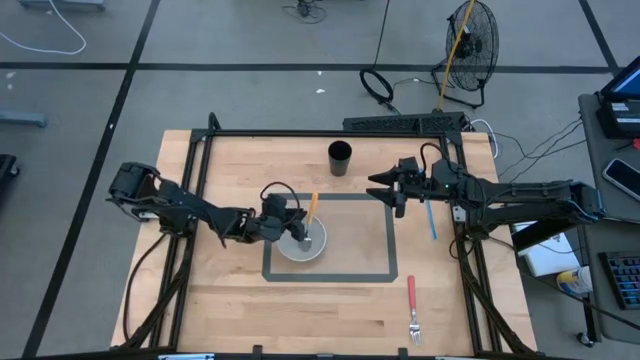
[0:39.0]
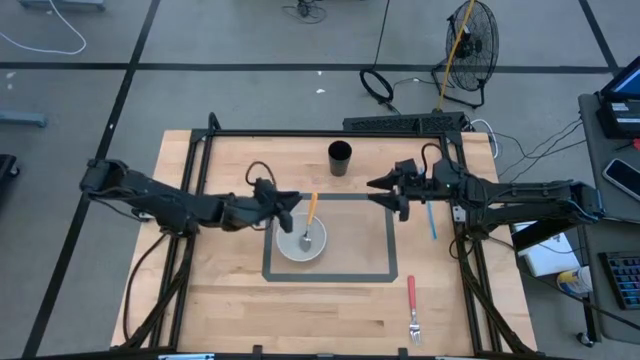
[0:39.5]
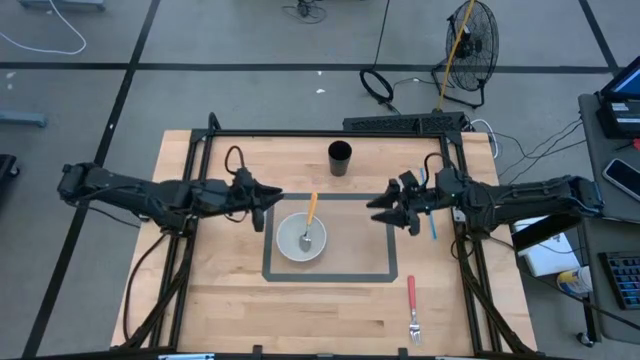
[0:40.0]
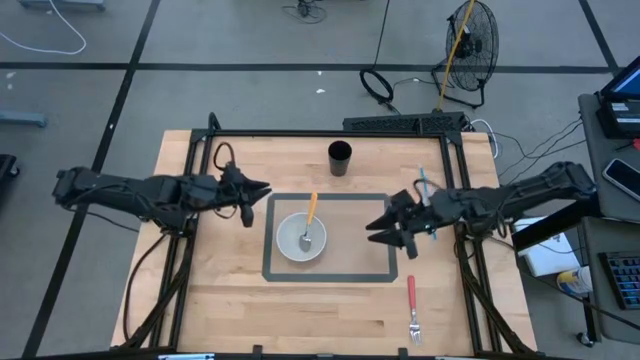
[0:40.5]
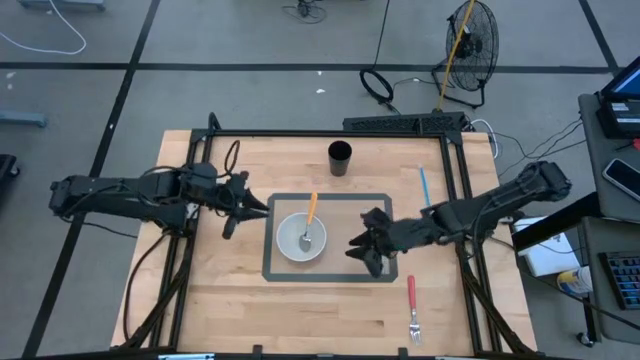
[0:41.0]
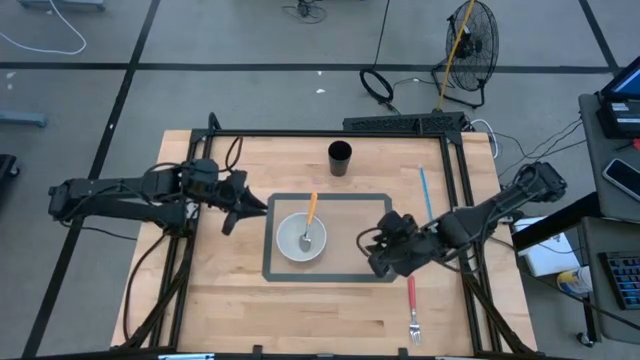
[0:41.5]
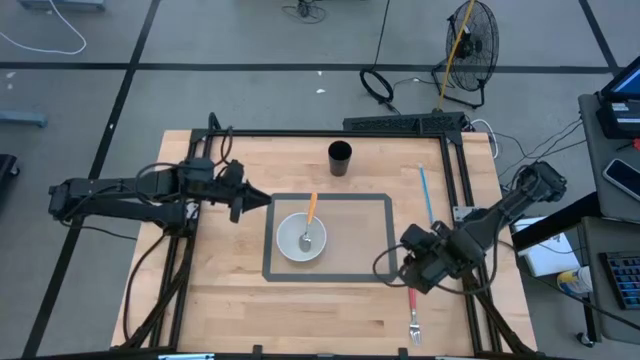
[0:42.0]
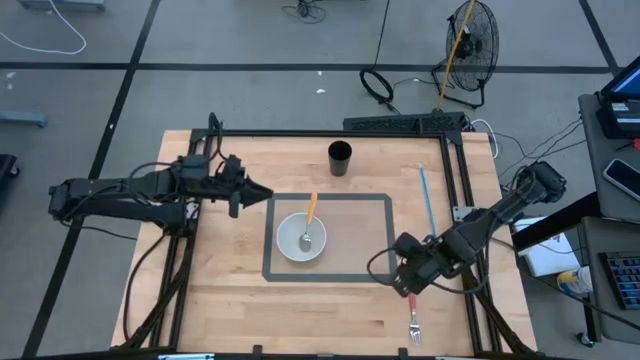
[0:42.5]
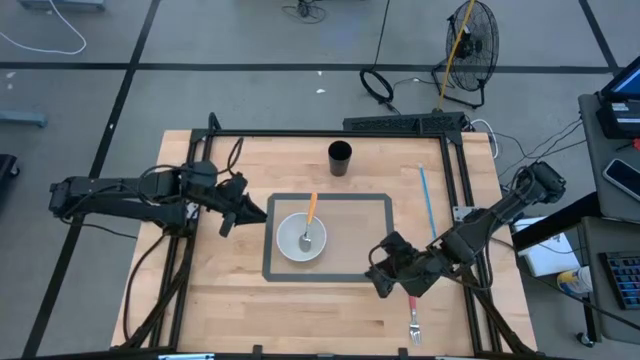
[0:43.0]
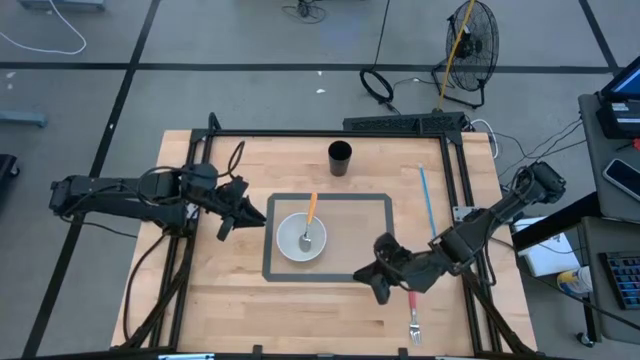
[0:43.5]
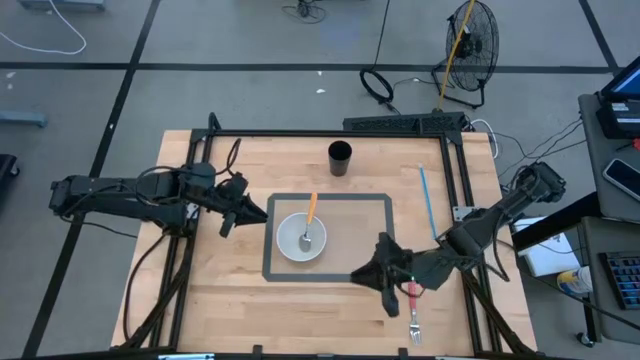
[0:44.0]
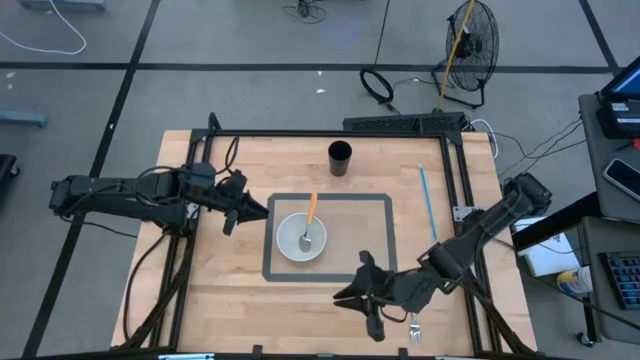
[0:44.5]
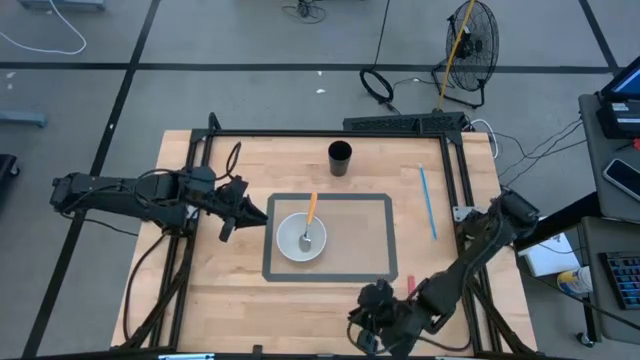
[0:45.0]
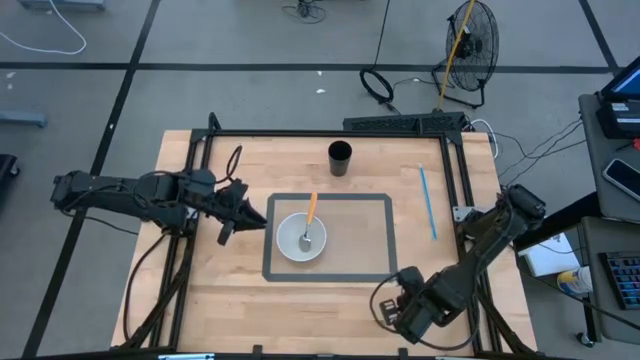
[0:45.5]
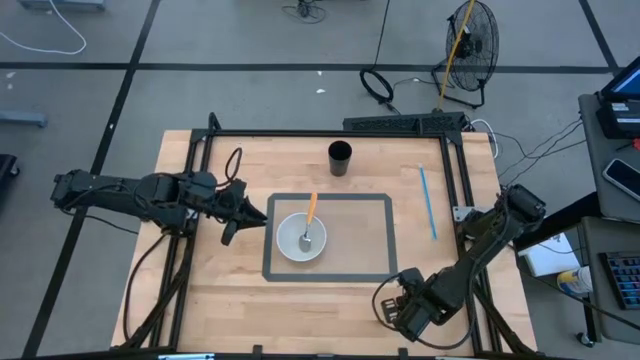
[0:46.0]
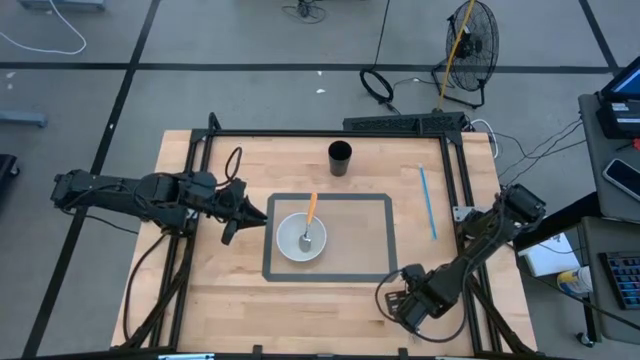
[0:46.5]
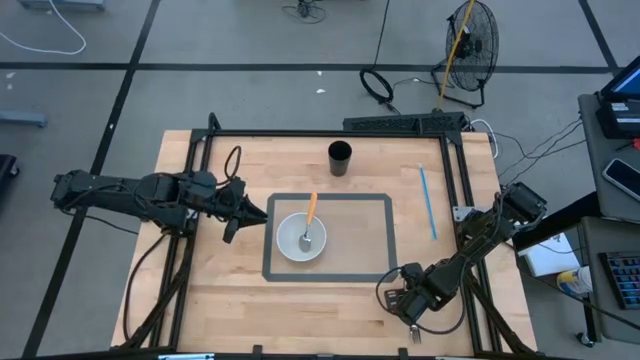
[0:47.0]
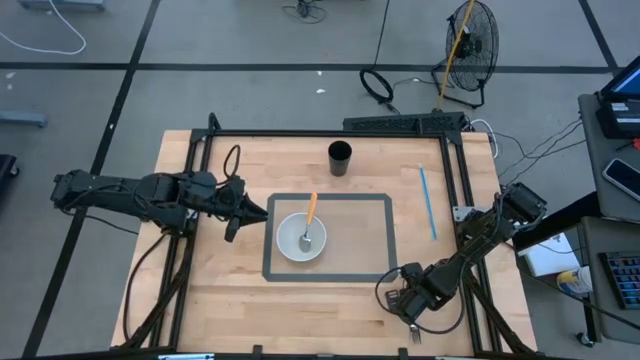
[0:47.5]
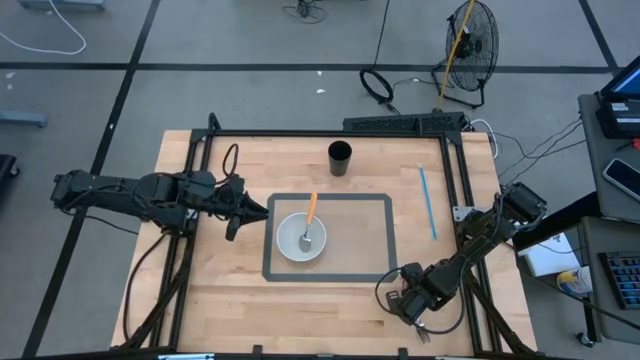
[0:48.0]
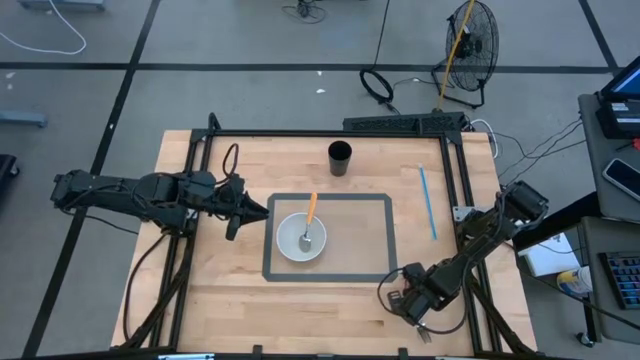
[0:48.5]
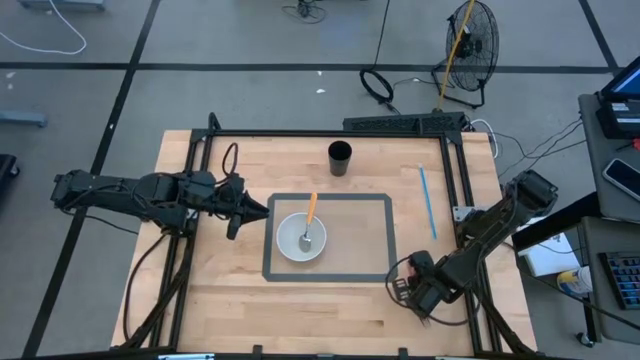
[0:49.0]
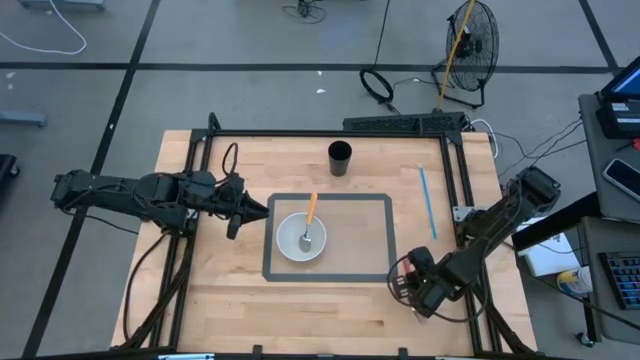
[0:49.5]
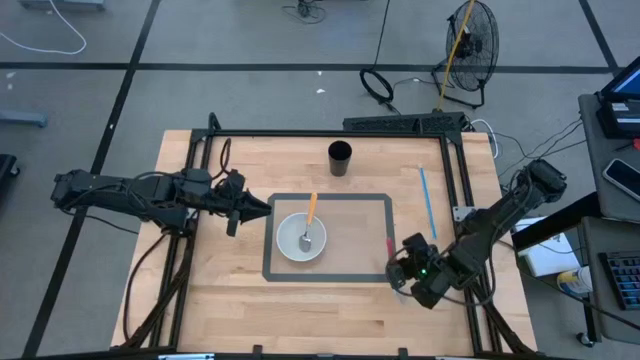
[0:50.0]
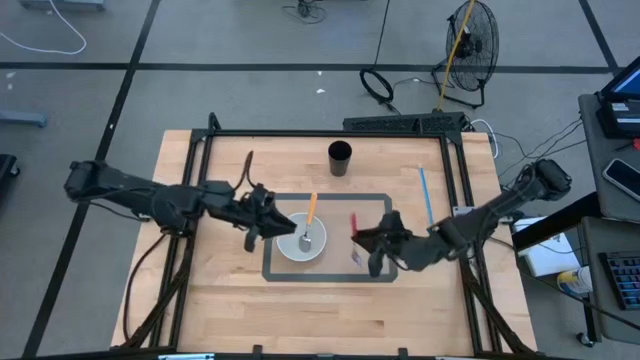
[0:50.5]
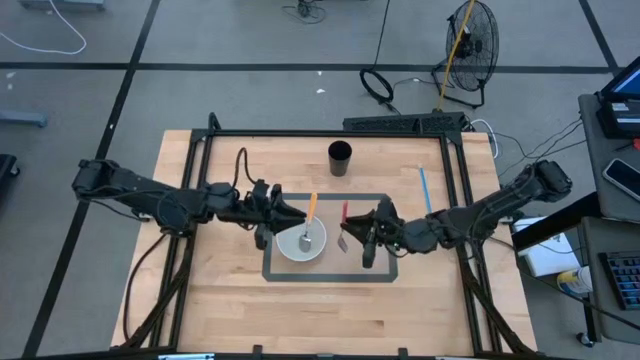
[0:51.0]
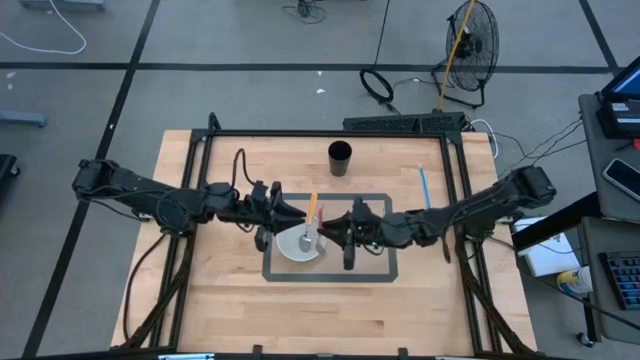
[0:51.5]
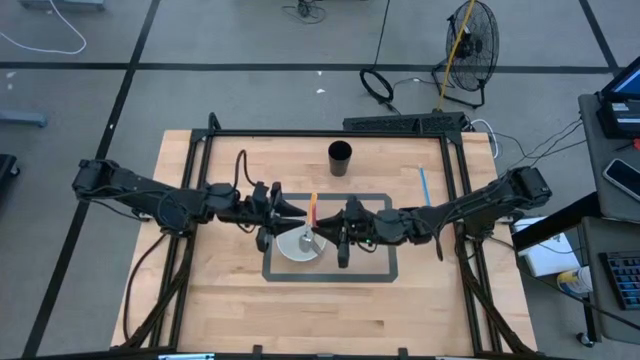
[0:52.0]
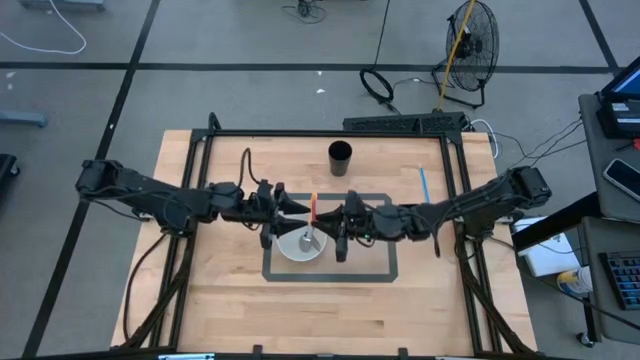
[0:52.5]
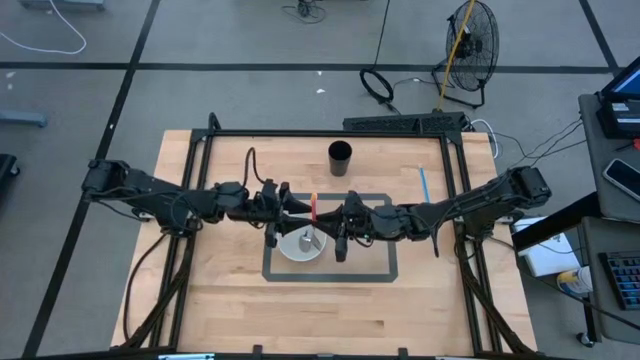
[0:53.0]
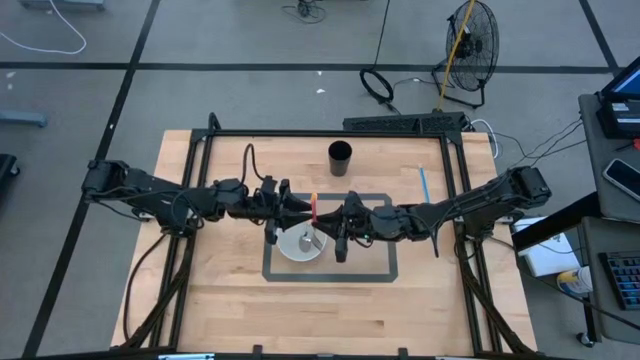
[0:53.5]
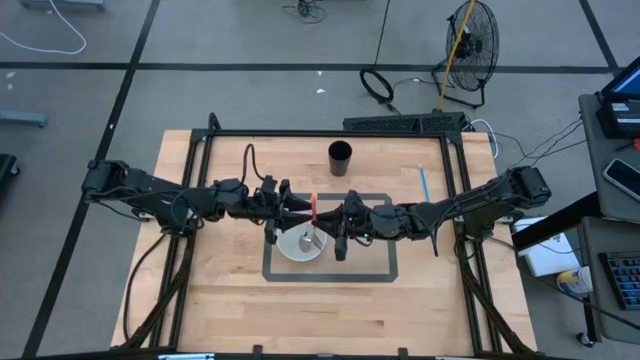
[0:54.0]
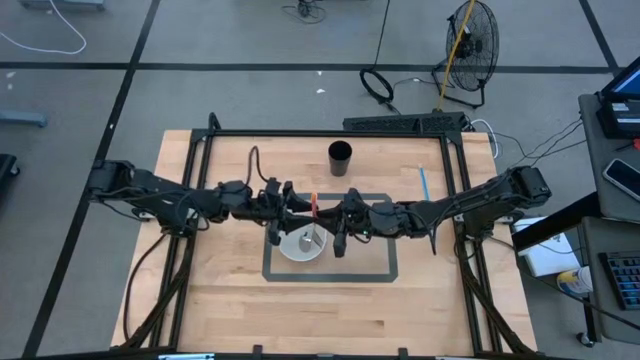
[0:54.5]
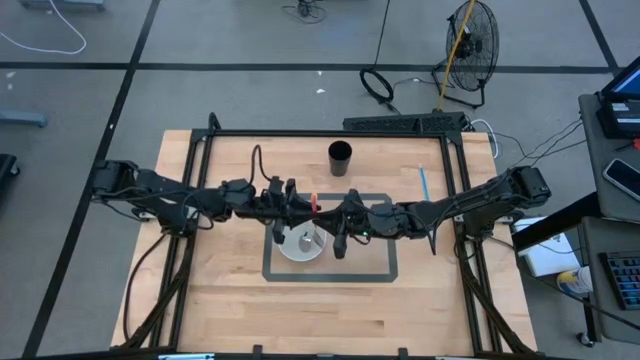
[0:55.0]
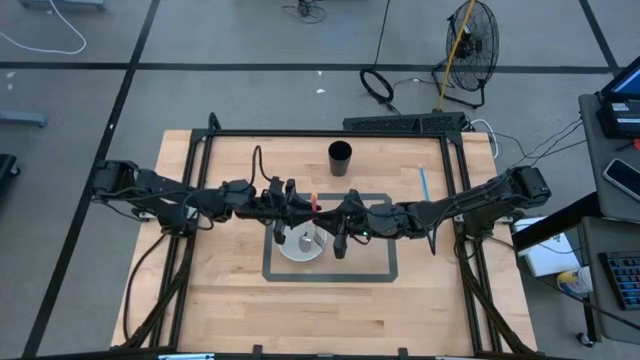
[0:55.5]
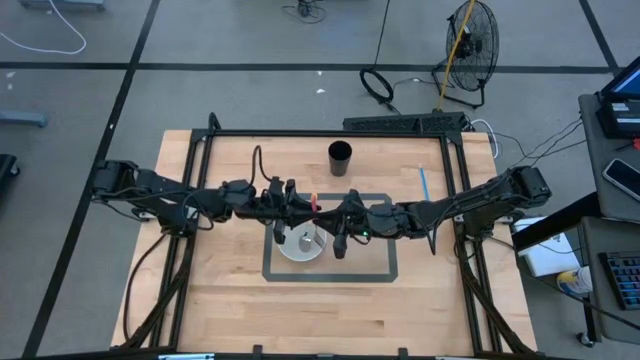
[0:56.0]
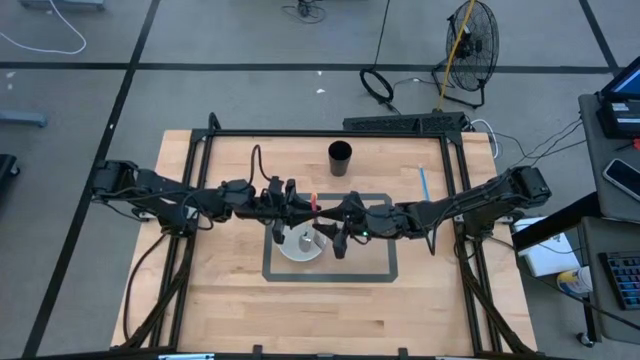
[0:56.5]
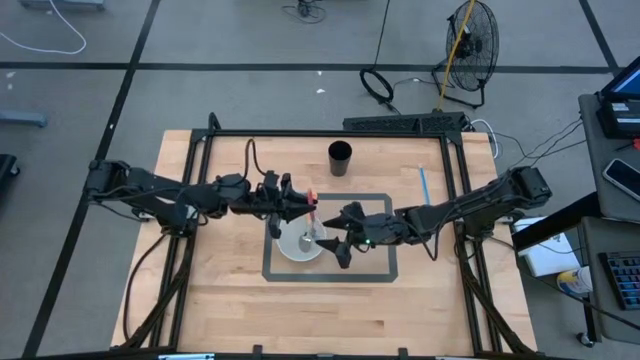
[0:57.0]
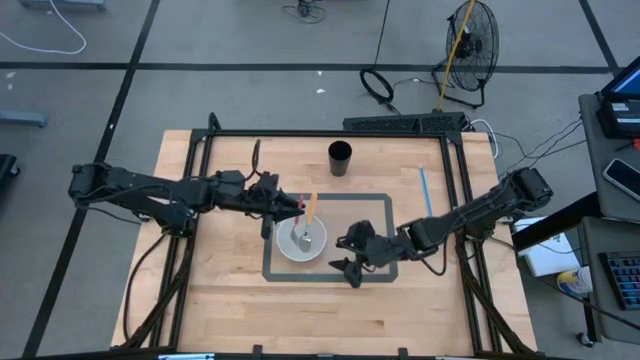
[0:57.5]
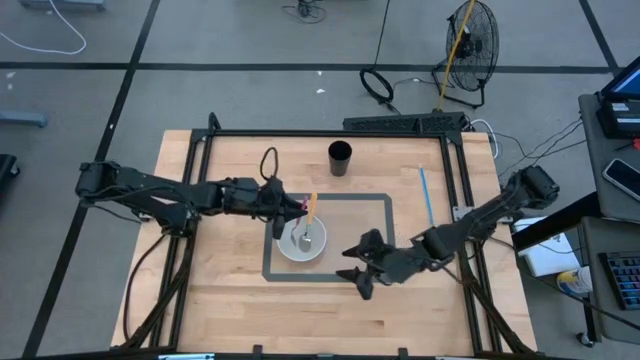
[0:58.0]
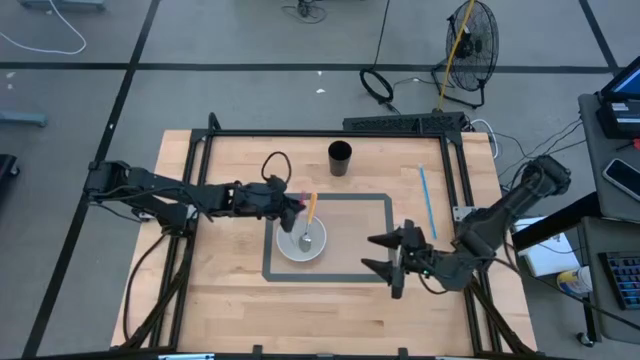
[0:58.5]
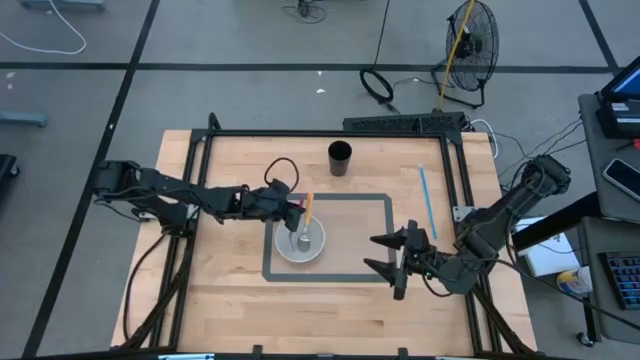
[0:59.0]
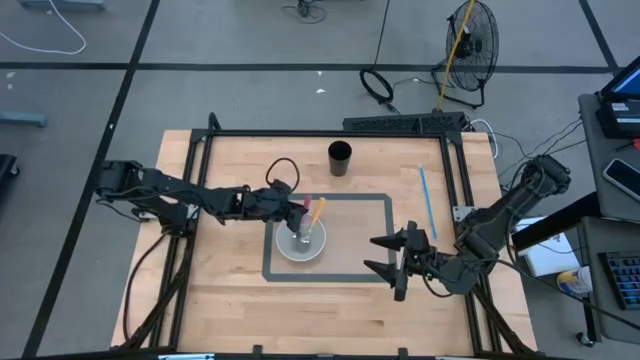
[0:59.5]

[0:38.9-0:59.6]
Task: Pick & Place Utensil
Put the pink fork into the white bowl on the light brown mat
